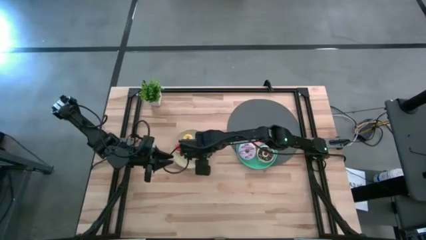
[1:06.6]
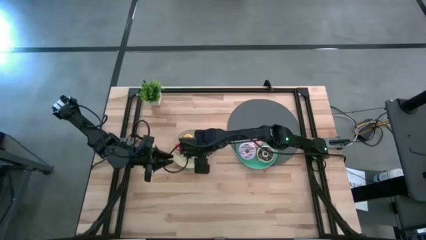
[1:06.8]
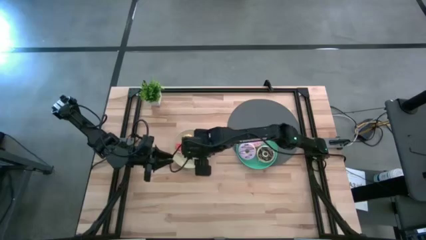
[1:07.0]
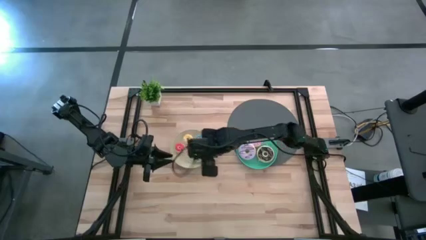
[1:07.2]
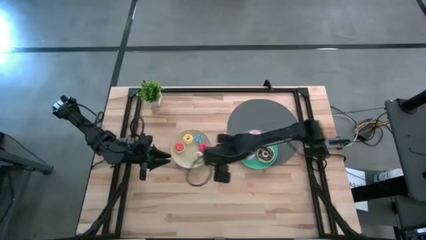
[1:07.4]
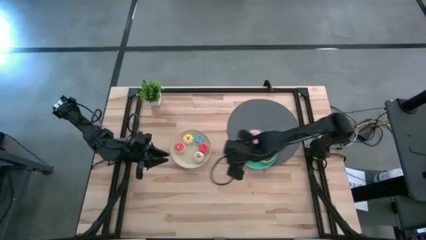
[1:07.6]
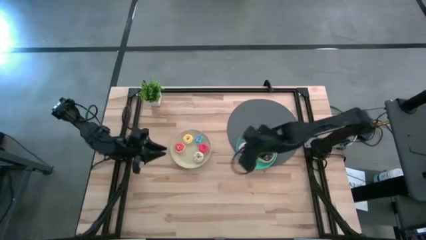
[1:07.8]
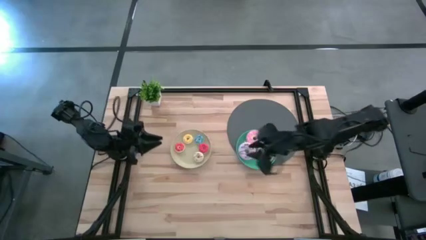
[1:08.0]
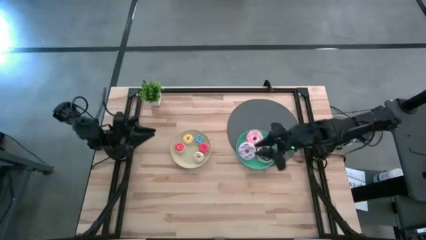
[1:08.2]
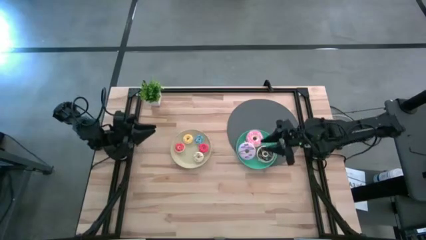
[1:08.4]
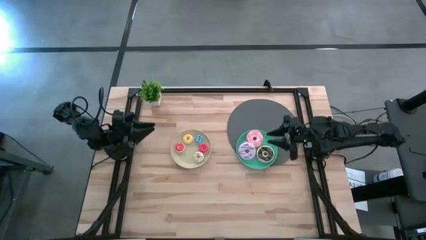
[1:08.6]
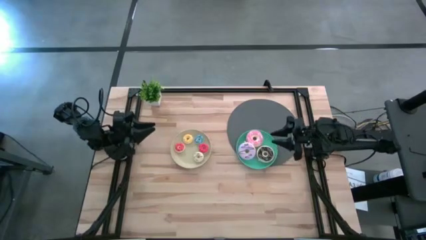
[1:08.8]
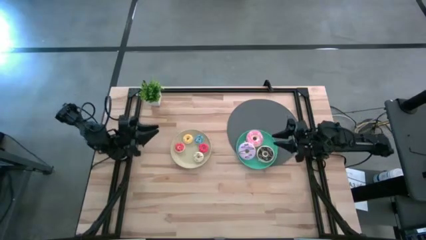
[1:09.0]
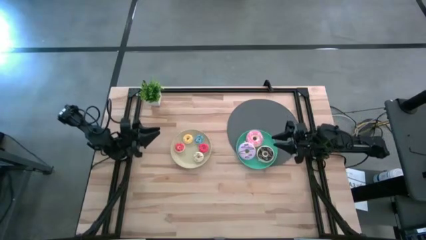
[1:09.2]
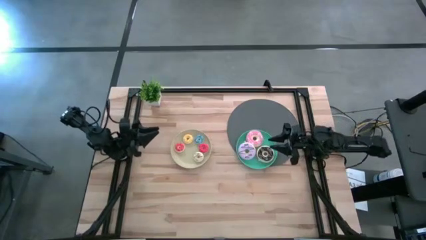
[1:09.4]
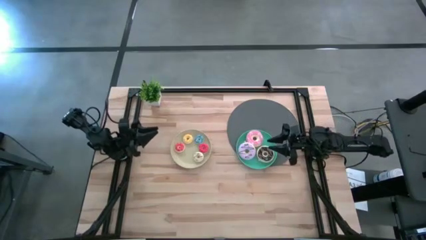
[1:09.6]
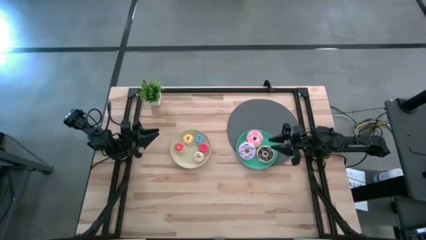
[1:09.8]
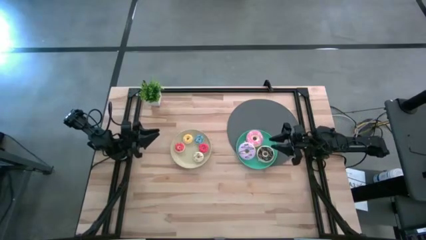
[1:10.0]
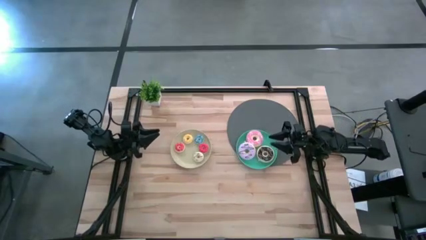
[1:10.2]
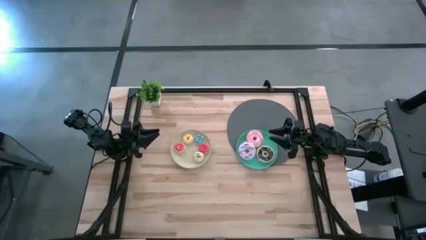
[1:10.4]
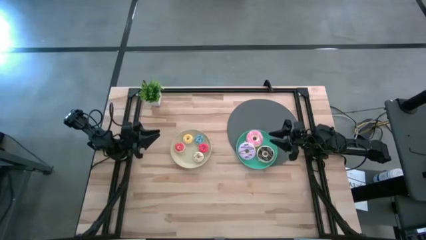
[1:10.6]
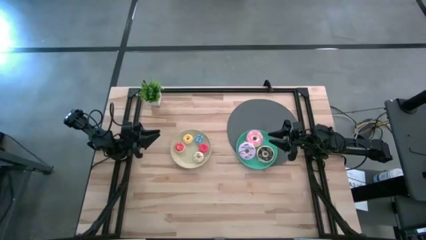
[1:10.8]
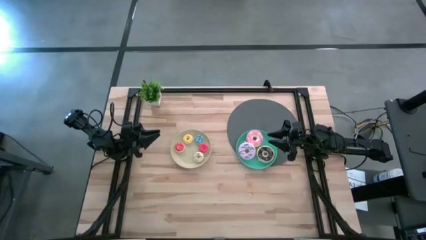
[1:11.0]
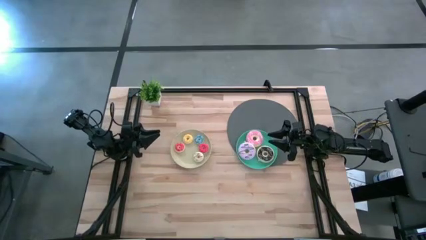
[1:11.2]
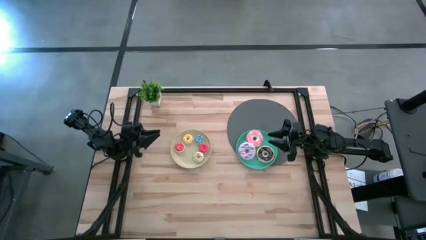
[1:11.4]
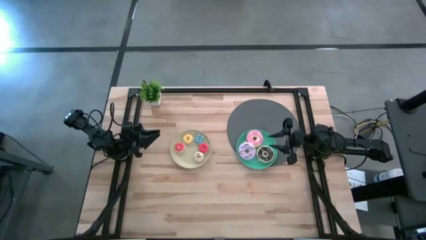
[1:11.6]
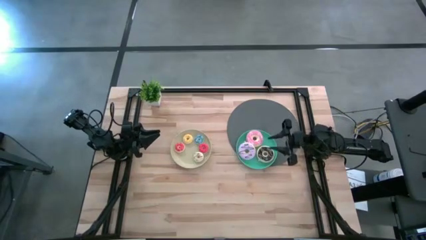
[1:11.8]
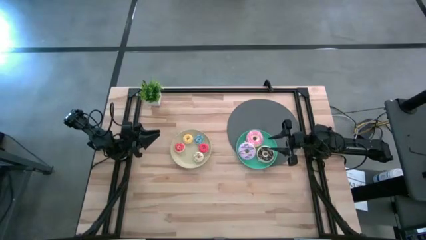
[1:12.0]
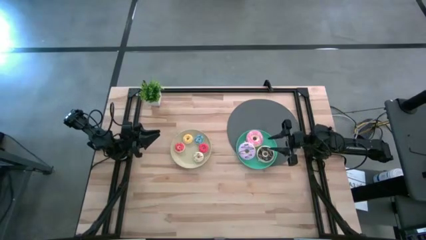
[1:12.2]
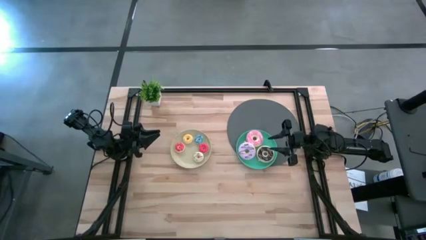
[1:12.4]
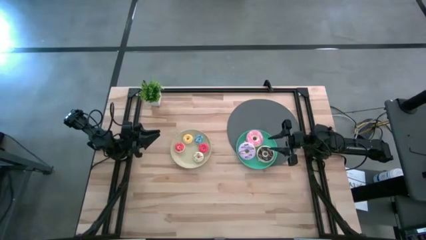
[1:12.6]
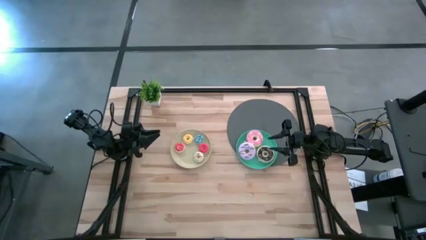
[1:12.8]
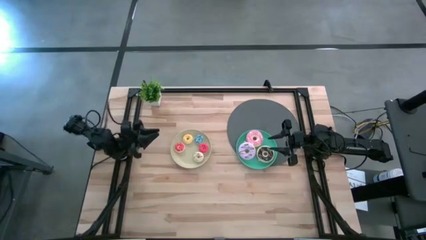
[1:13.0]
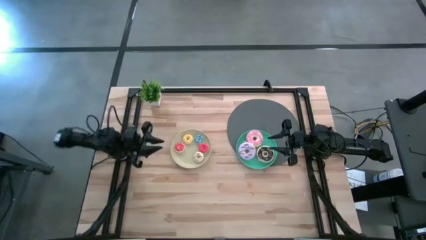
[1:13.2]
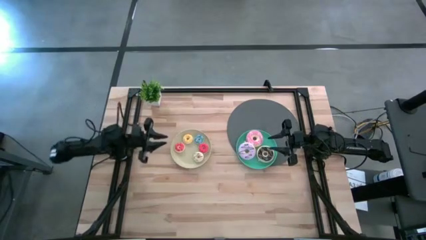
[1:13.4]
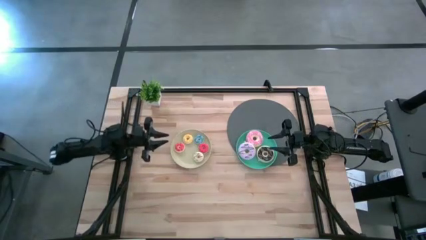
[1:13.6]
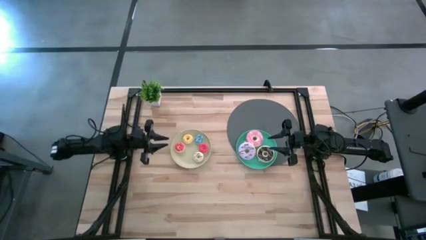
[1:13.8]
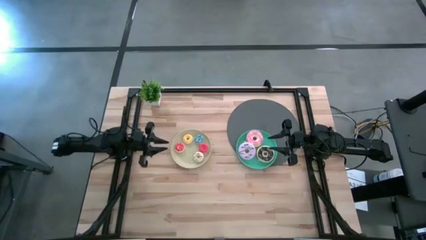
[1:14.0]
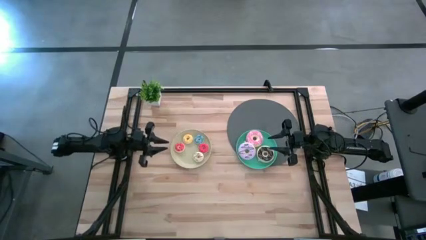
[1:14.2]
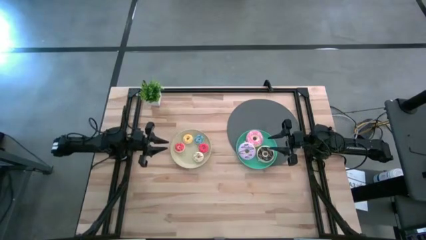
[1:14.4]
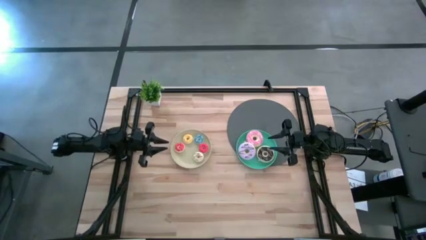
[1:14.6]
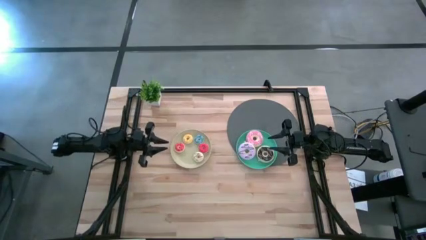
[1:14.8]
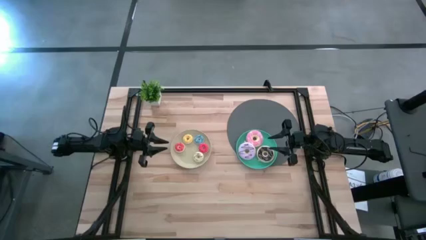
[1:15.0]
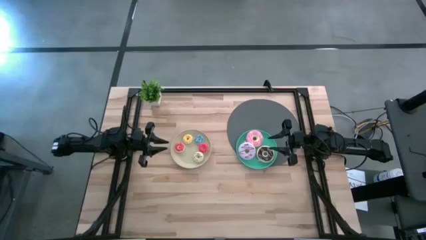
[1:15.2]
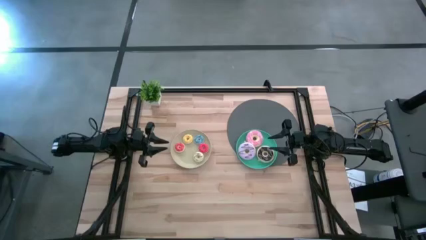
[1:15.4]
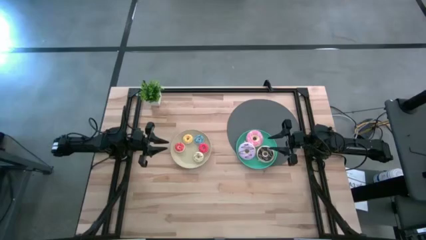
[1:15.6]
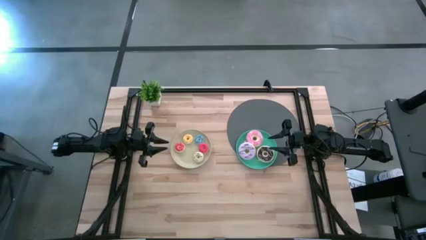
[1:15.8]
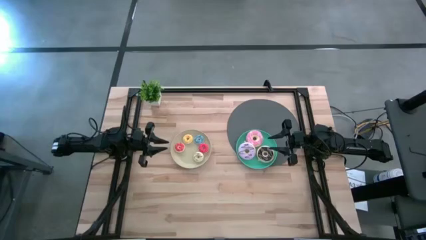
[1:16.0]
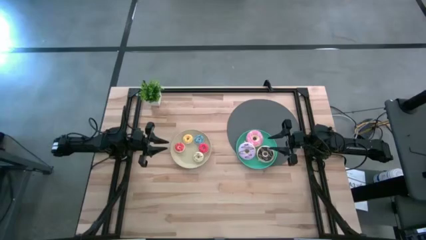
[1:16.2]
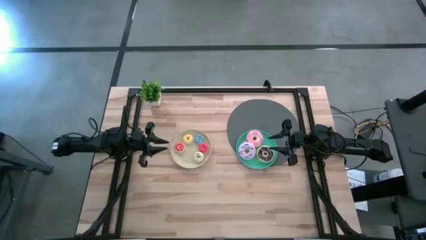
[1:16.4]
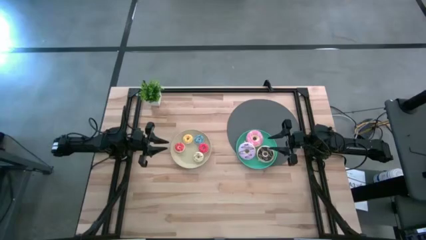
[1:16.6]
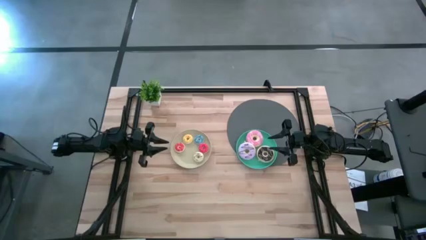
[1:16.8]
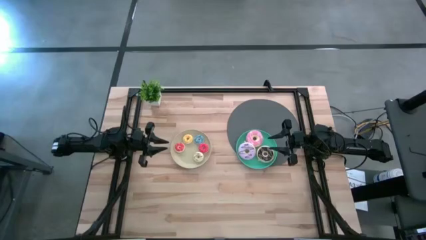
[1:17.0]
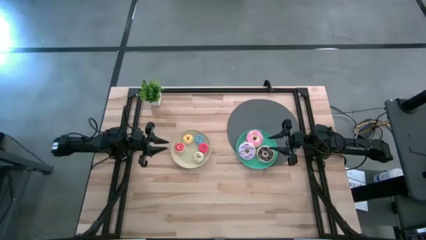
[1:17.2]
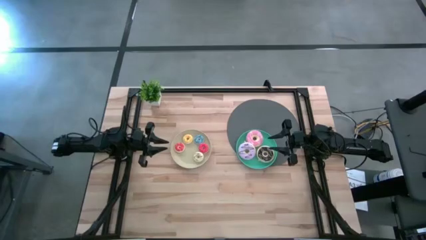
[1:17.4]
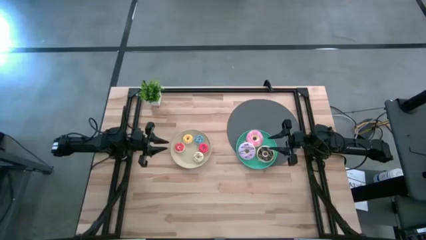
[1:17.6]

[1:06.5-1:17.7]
Task: Pick & Place donuts
Return to Home Position
